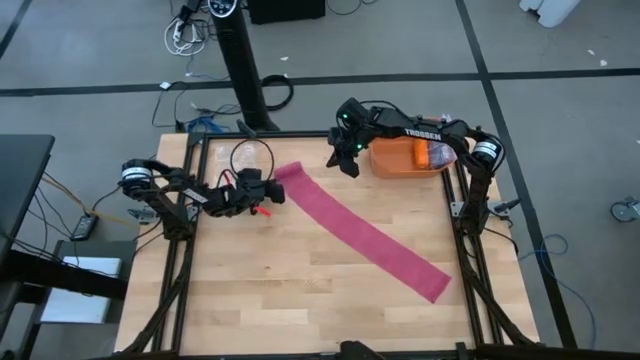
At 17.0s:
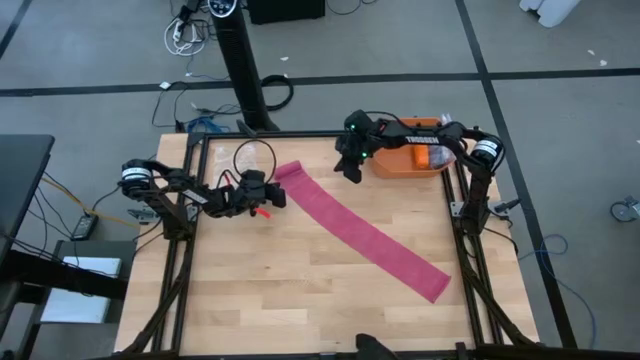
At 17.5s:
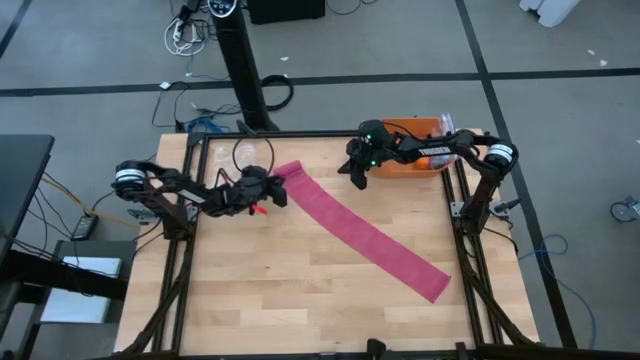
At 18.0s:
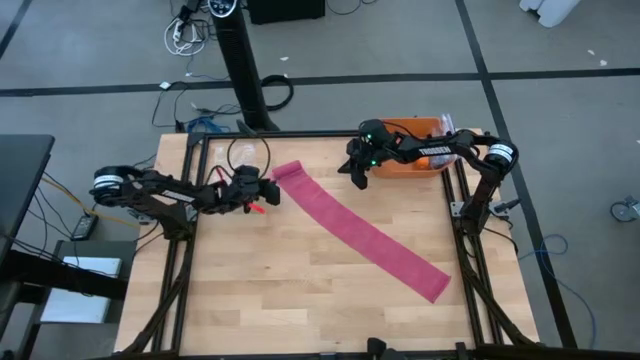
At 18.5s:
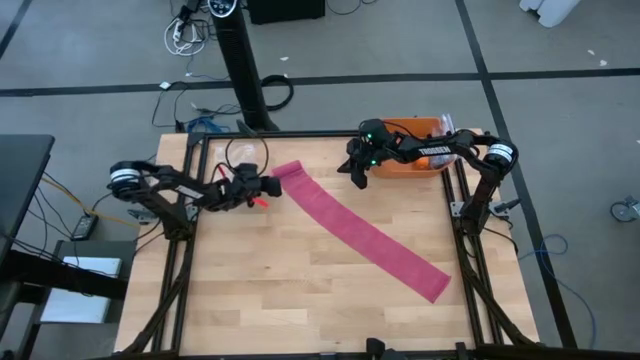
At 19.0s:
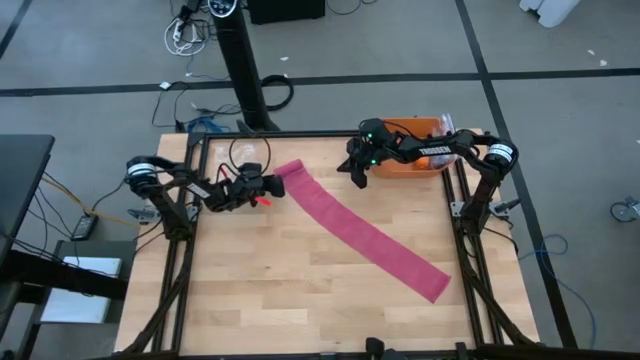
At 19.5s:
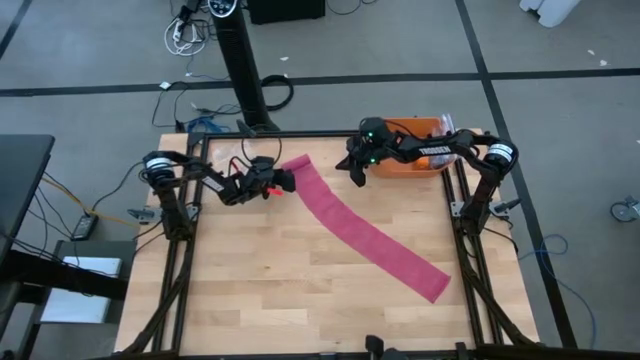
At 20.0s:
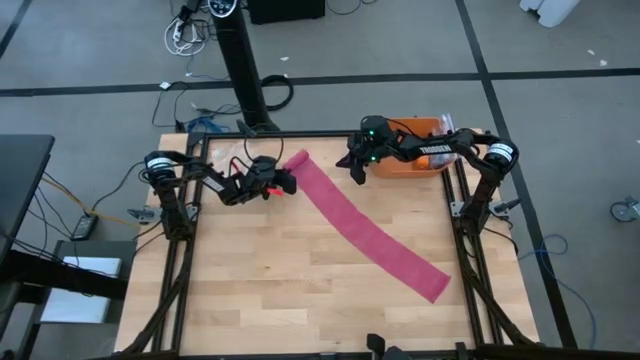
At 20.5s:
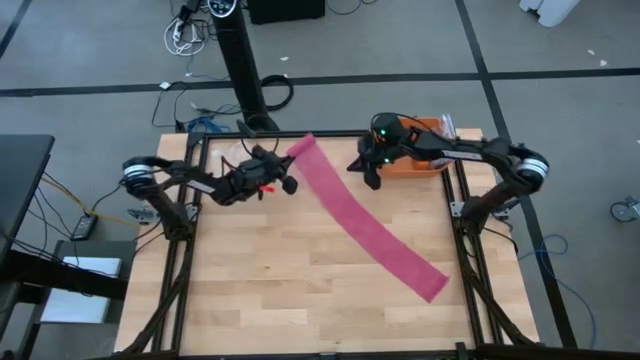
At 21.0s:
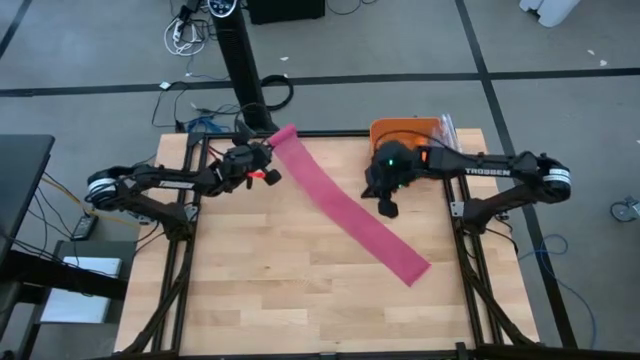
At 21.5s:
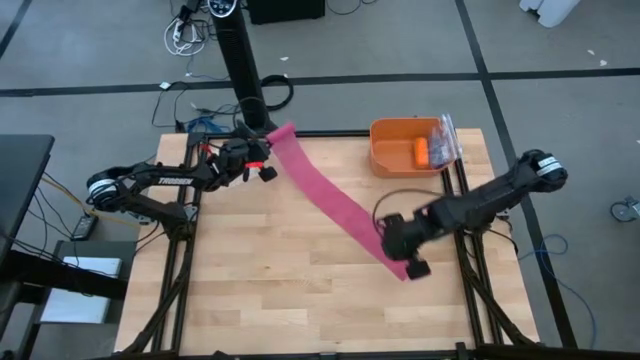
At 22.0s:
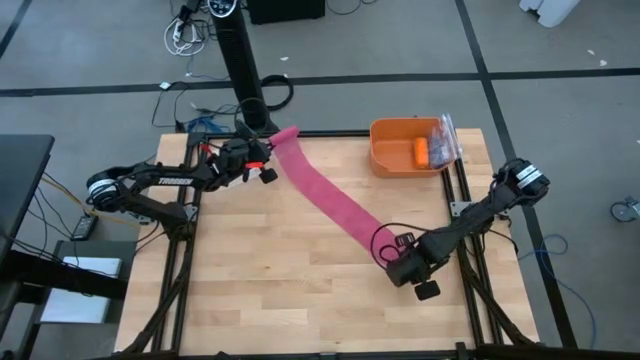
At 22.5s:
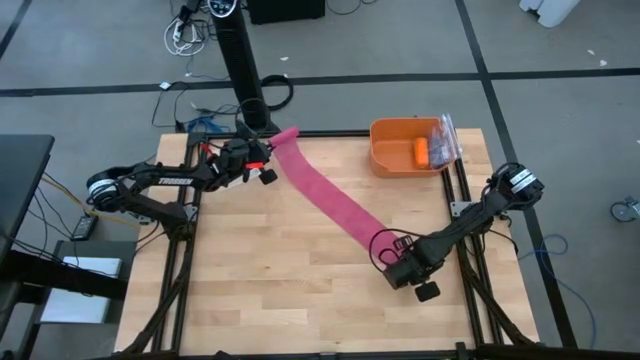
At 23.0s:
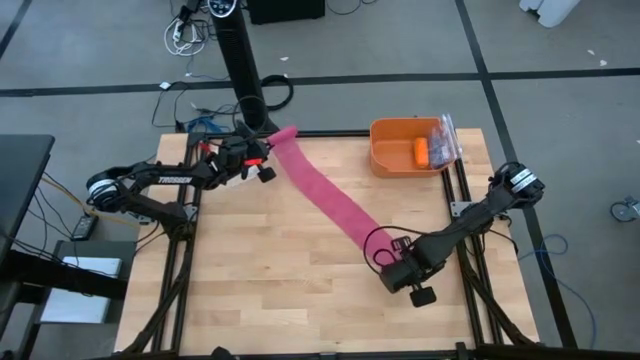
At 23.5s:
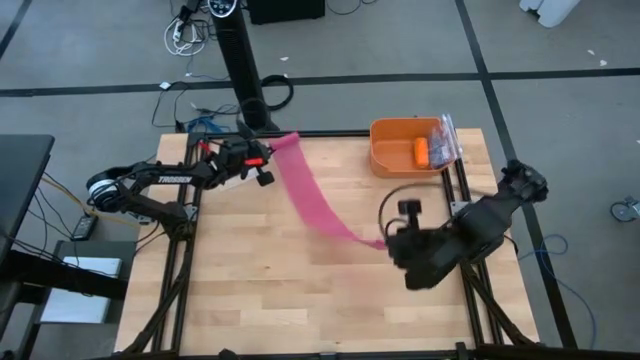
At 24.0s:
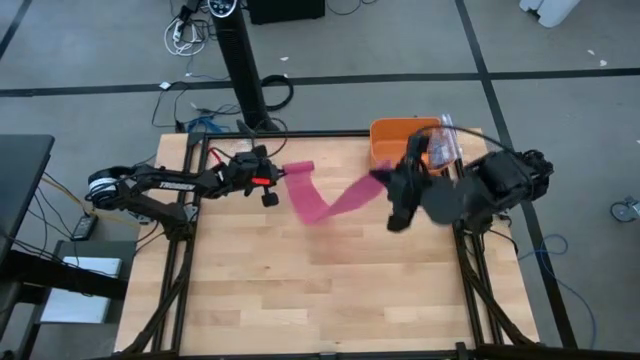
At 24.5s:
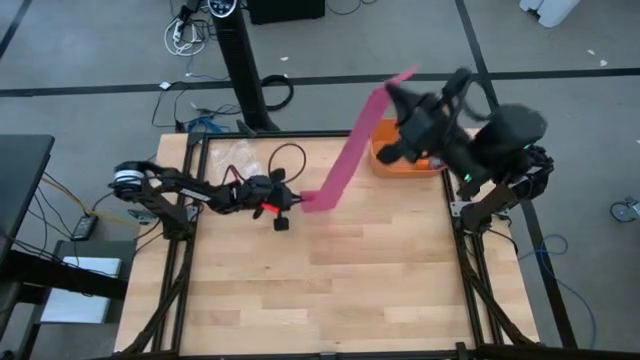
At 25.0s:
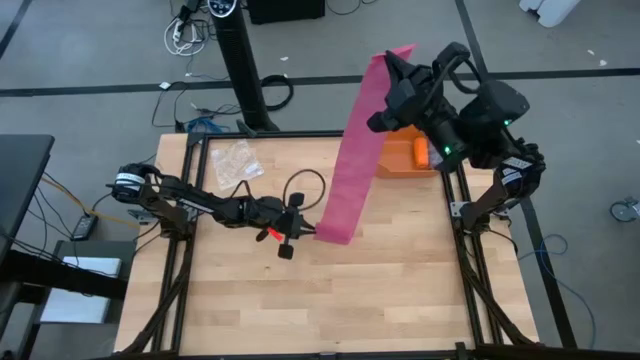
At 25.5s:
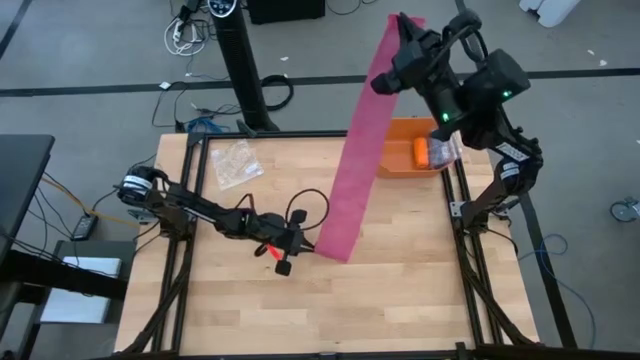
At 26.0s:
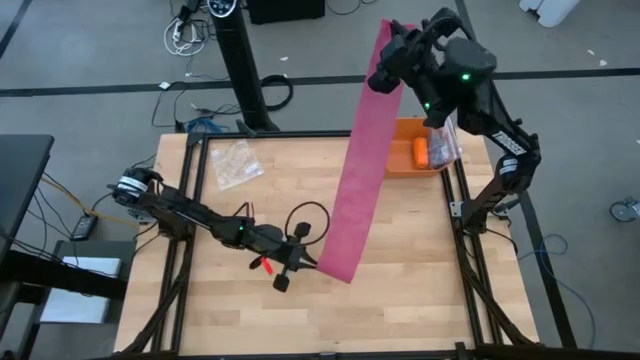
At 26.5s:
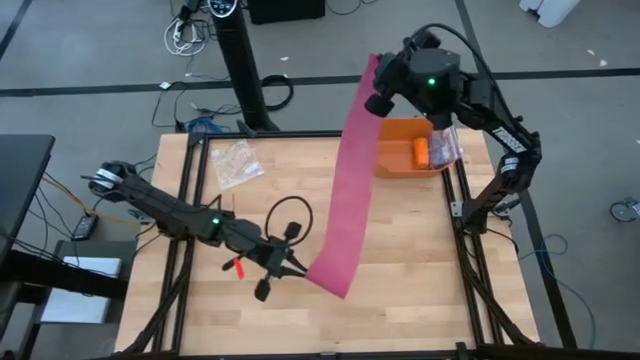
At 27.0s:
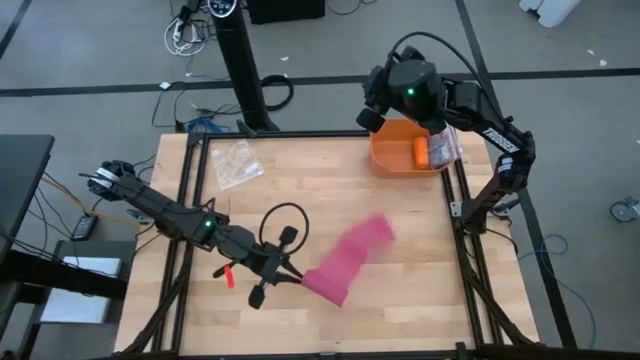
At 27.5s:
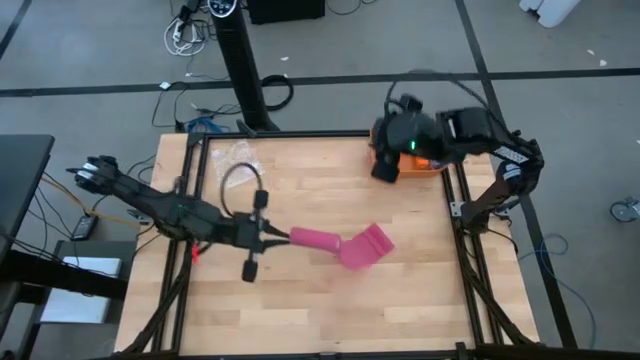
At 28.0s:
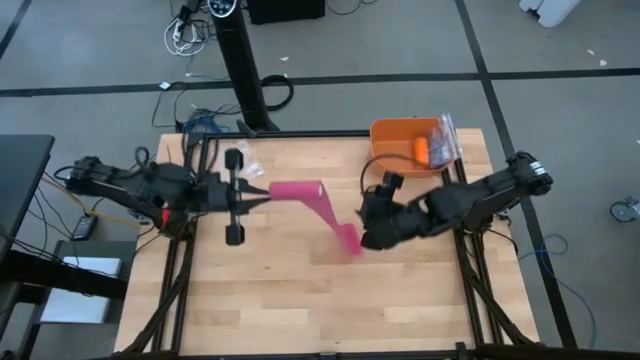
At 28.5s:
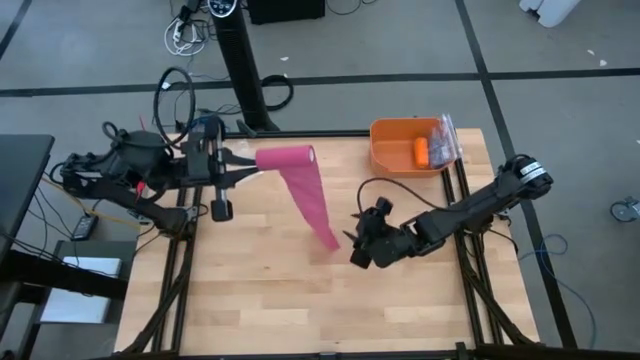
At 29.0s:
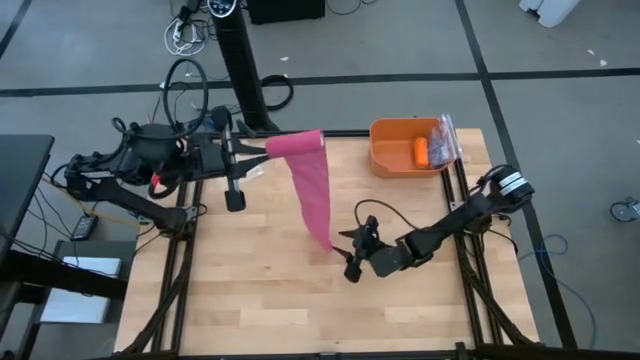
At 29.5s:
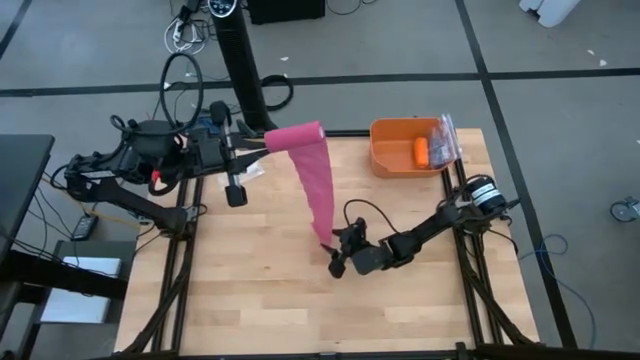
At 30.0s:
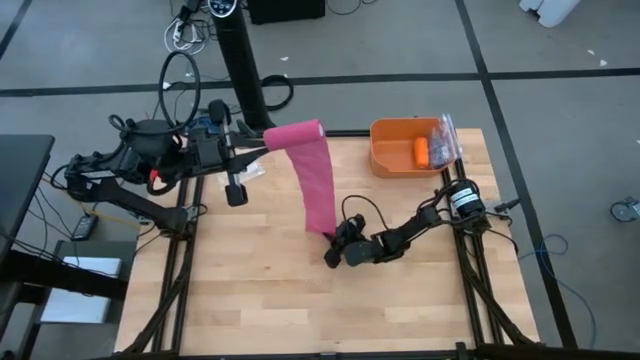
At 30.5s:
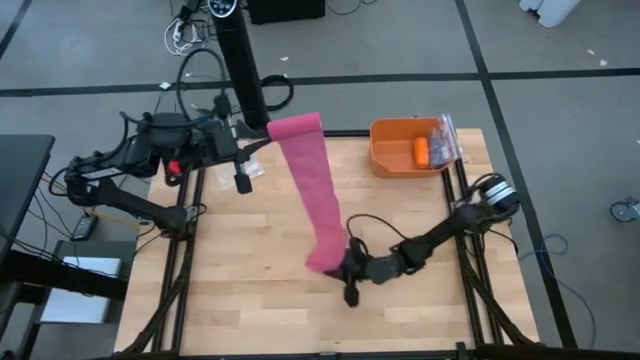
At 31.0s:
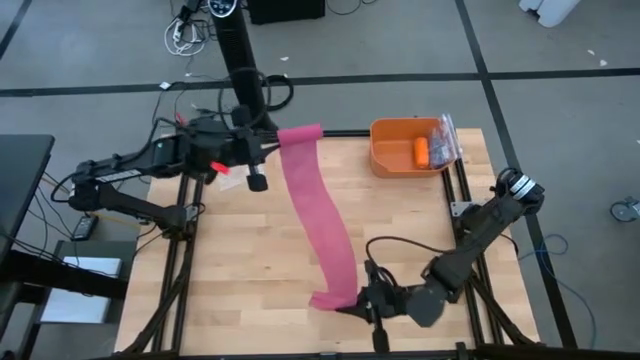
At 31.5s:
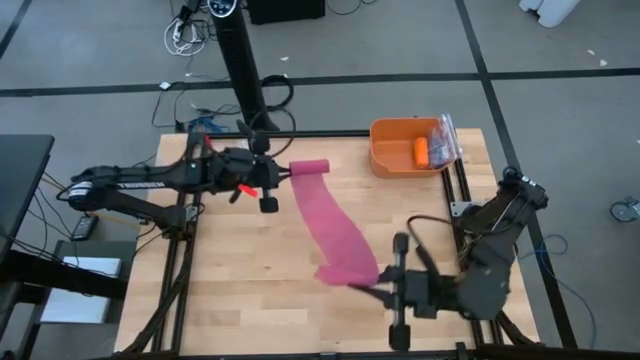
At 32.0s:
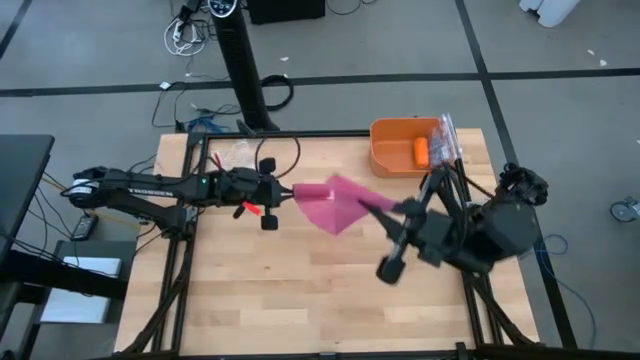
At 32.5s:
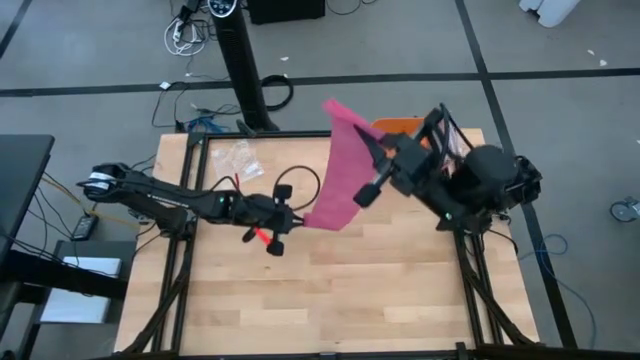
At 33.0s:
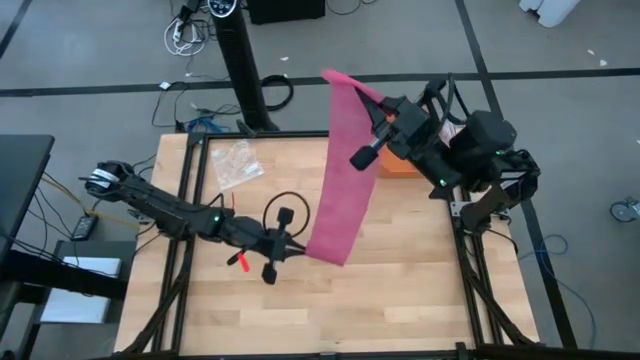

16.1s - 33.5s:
Task: Roll bandage
Roll the pink bandage

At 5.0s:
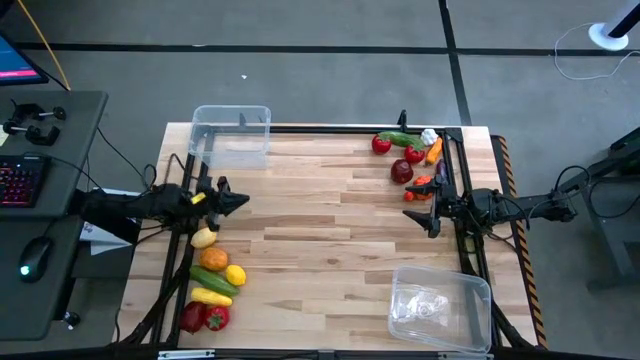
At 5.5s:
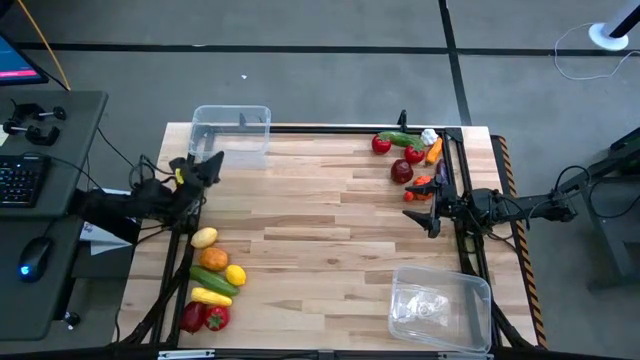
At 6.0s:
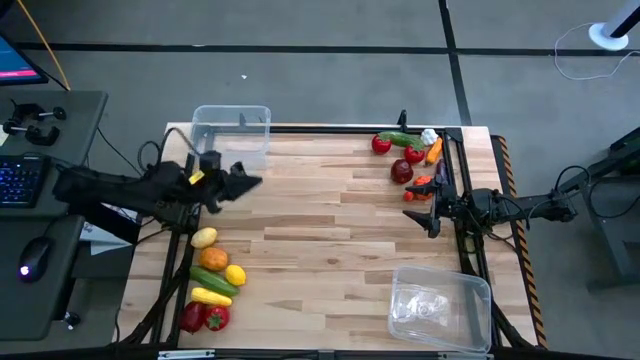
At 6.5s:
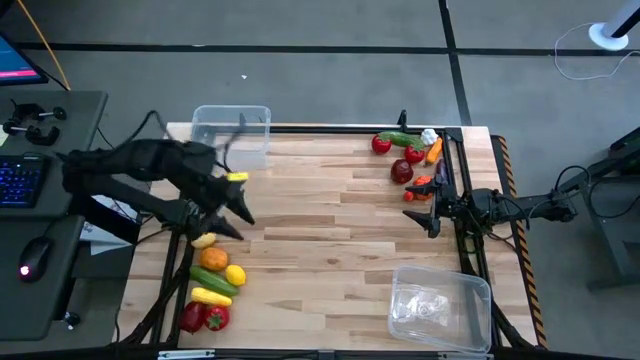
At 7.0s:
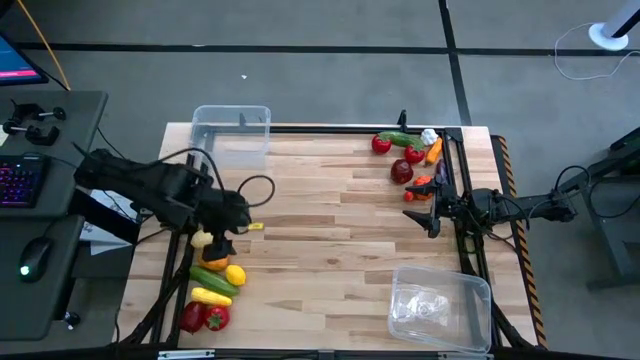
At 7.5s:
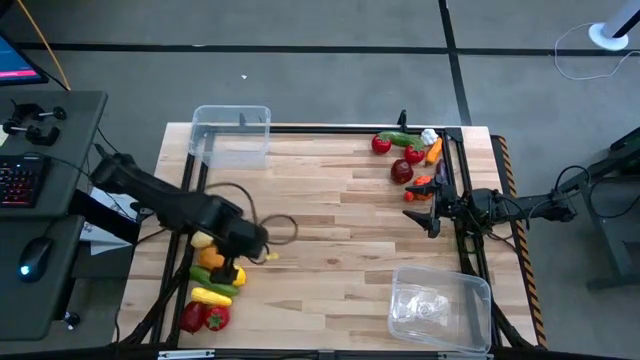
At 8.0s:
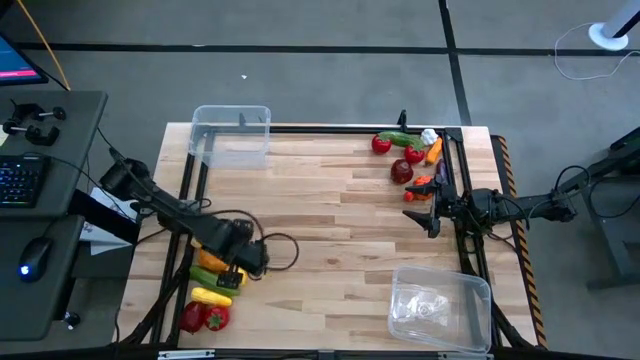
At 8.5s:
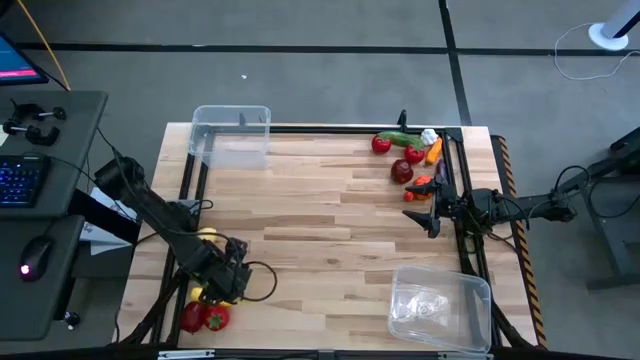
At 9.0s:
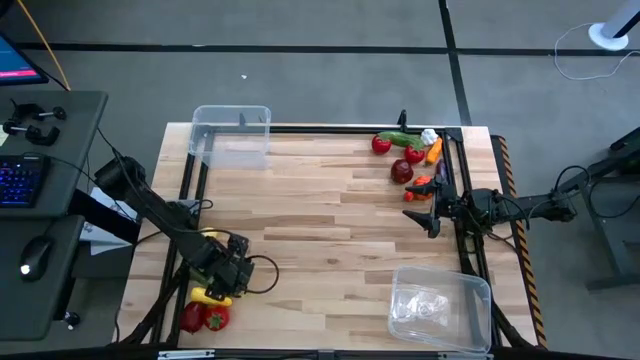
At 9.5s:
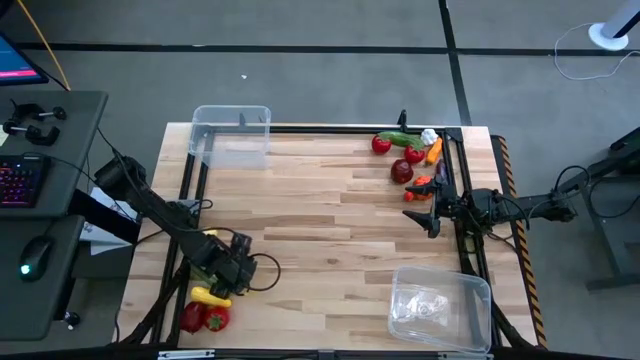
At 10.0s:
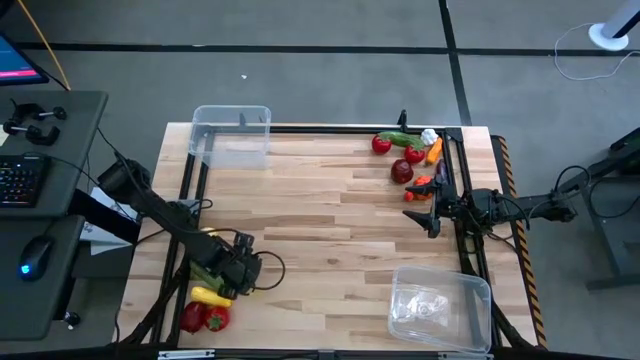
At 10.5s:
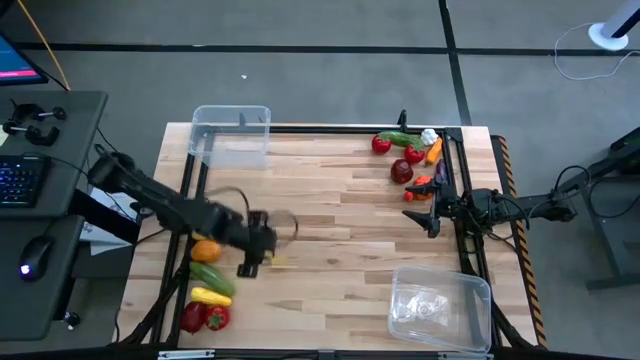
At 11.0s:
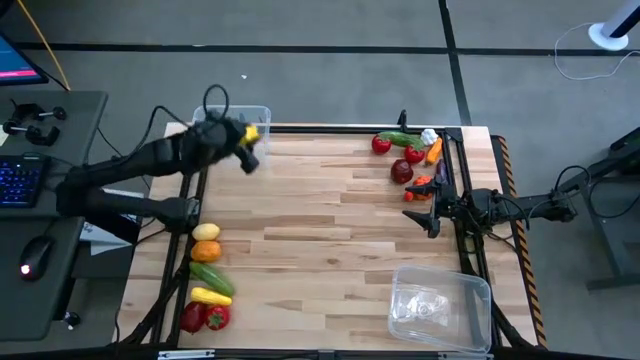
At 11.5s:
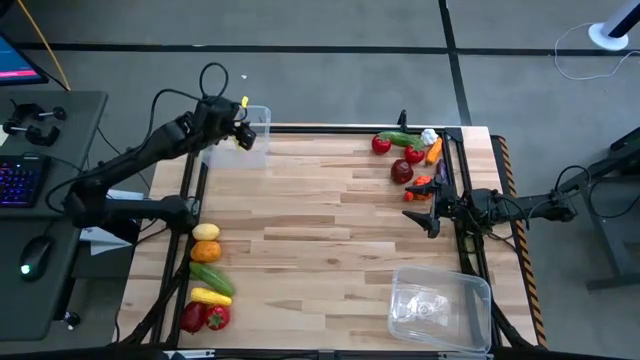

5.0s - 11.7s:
Task: Sort produce into baskets
Put the bottom yellow lemon into the top transparent bin
